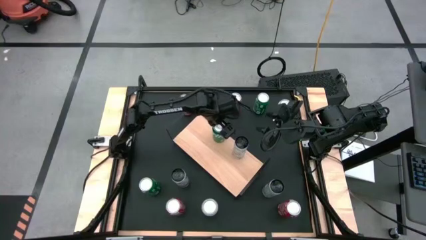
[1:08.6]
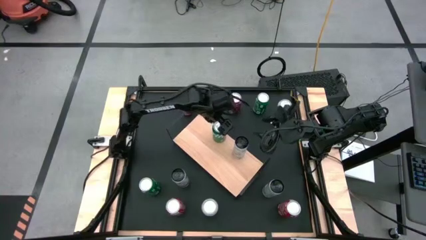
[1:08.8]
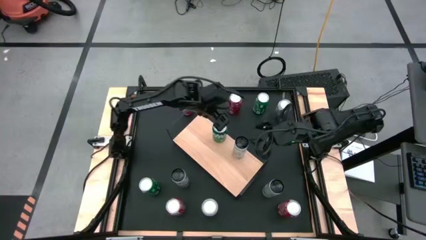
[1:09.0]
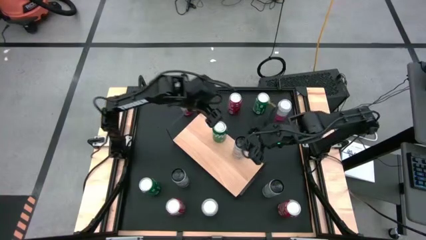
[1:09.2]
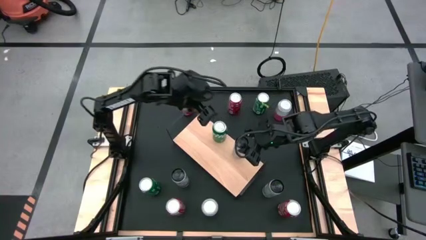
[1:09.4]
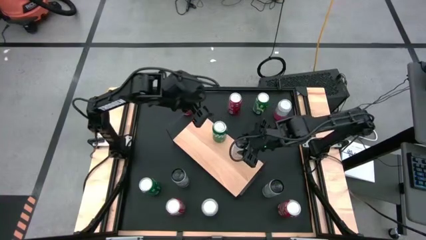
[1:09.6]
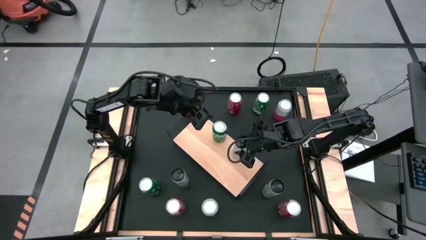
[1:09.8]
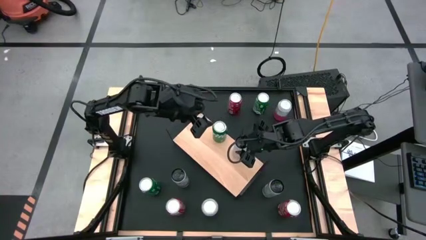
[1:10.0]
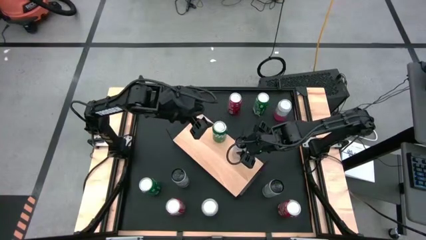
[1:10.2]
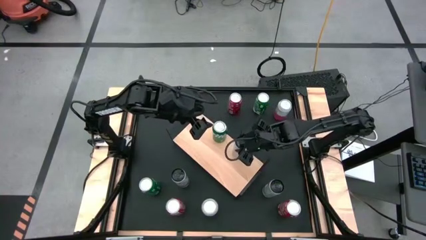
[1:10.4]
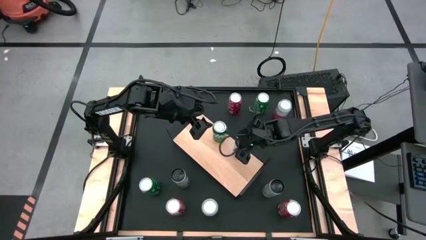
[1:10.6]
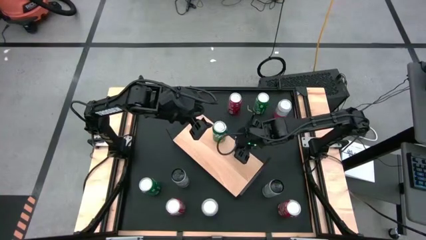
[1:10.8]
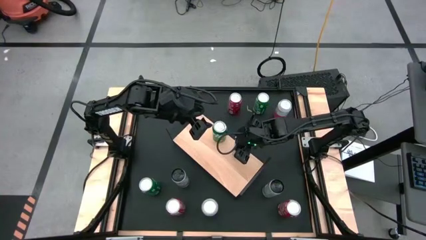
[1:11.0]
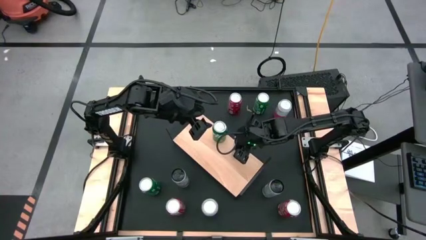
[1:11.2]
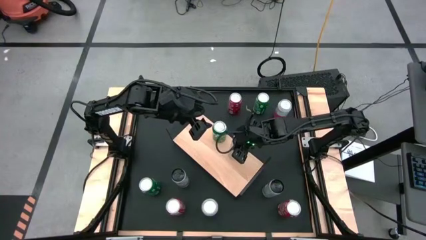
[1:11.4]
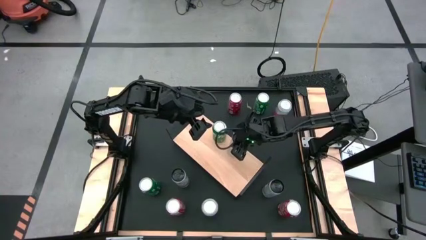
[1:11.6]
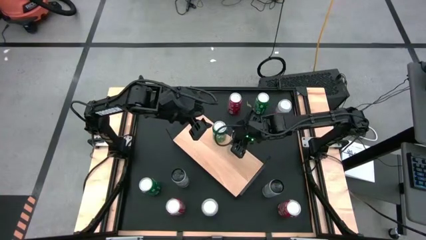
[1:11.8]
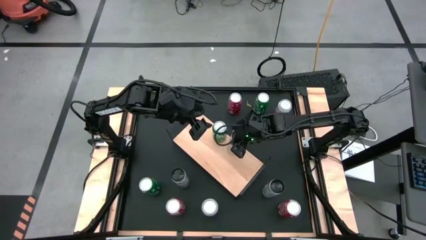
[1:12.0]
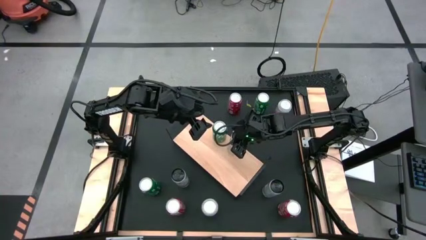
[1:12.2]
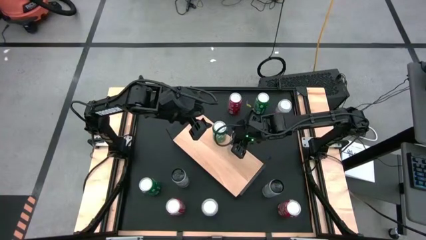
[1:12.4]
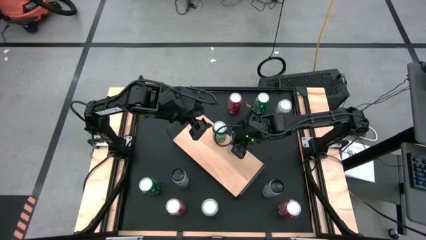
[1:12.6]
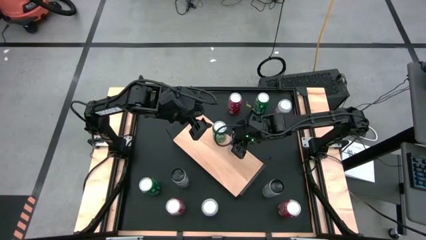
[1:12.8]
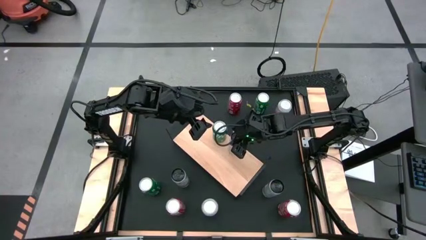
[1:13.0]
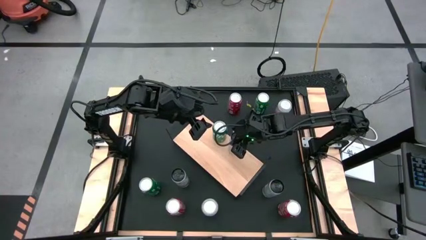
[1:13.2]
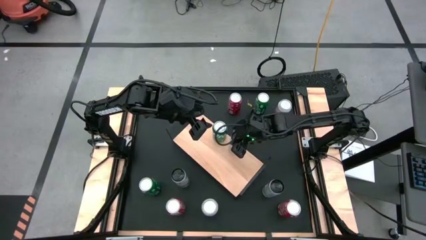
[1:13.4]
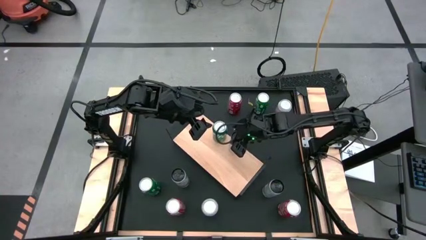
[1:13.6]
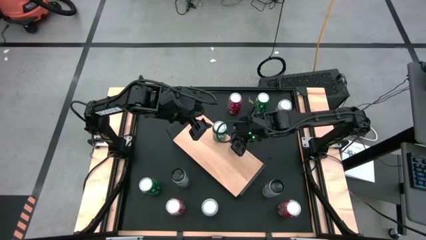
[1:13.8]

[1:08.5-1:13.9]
Task: Place canned beverage on shelf
Adjust the white can on the shelf

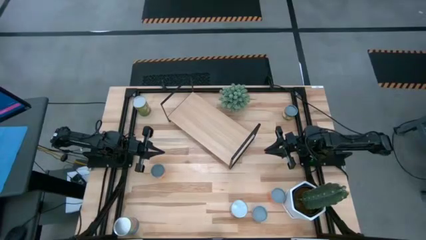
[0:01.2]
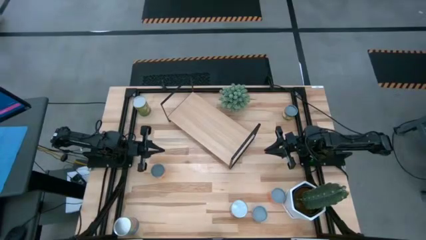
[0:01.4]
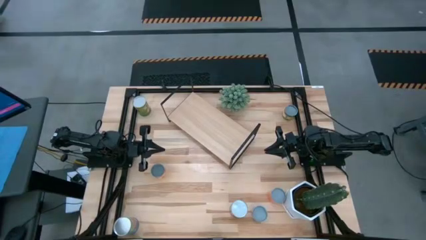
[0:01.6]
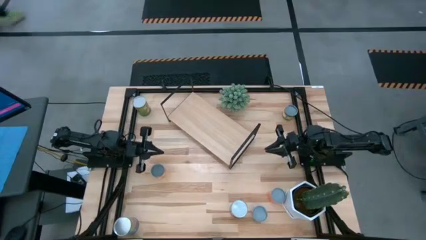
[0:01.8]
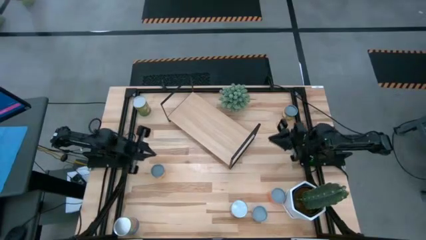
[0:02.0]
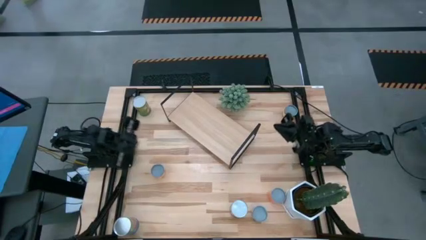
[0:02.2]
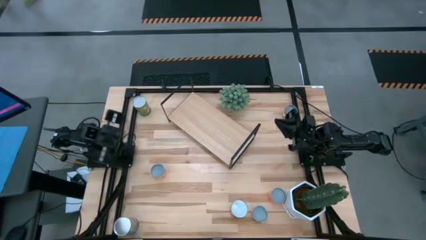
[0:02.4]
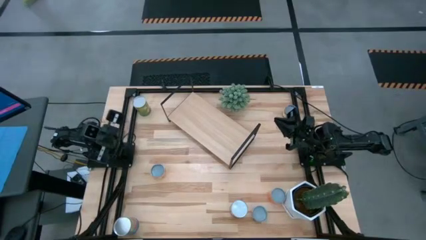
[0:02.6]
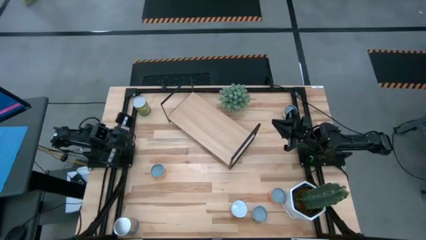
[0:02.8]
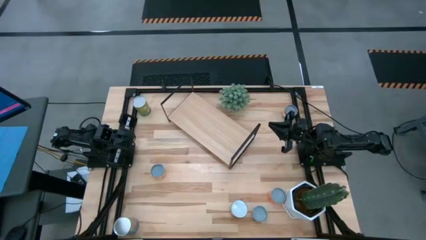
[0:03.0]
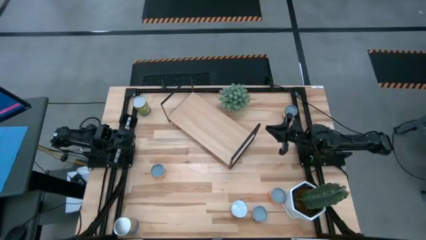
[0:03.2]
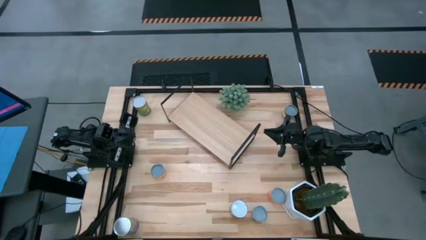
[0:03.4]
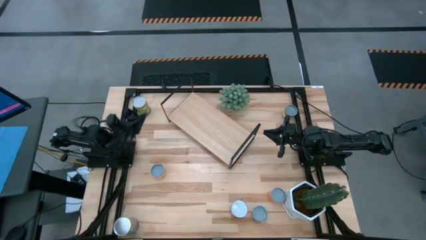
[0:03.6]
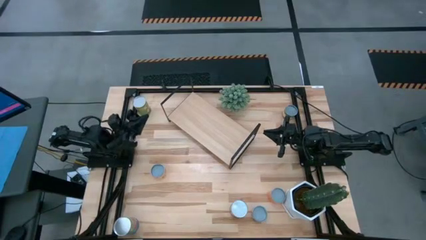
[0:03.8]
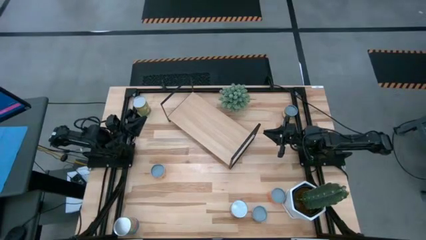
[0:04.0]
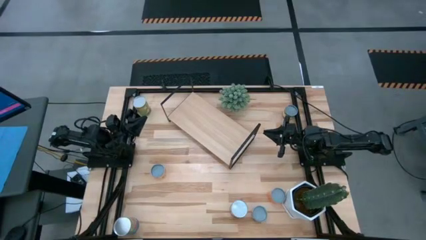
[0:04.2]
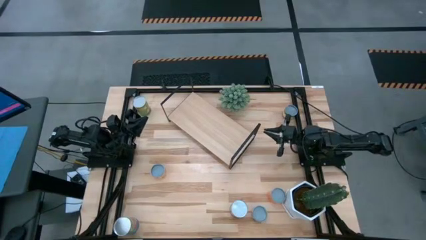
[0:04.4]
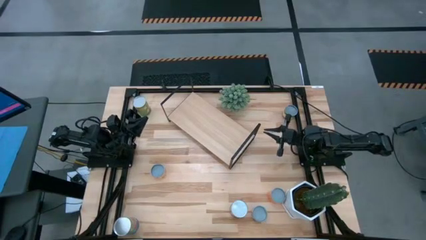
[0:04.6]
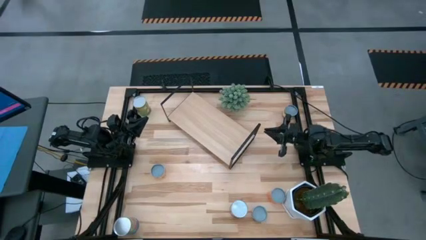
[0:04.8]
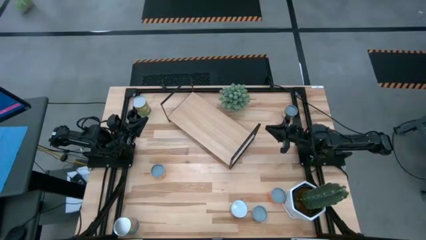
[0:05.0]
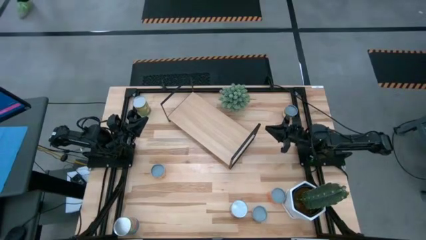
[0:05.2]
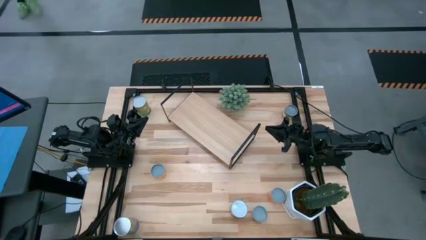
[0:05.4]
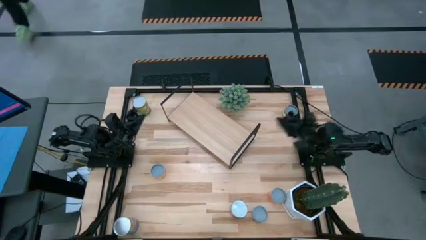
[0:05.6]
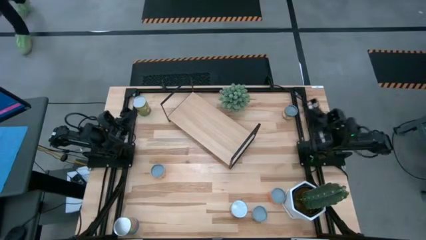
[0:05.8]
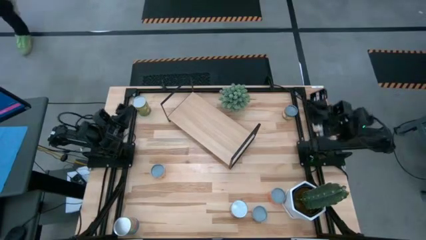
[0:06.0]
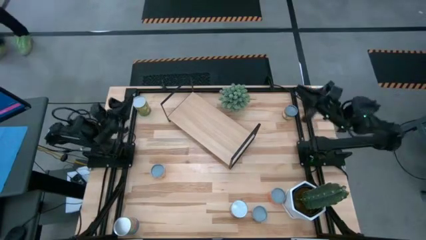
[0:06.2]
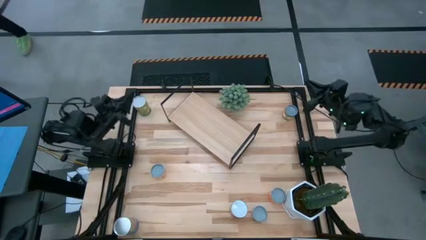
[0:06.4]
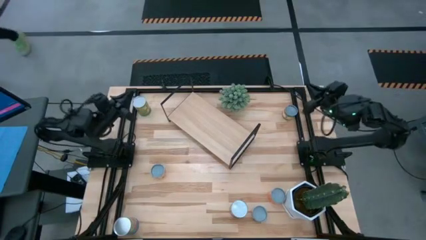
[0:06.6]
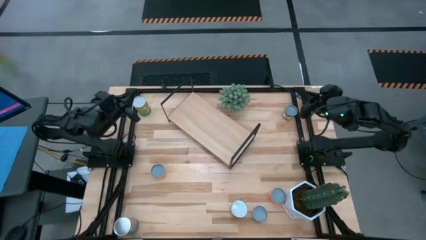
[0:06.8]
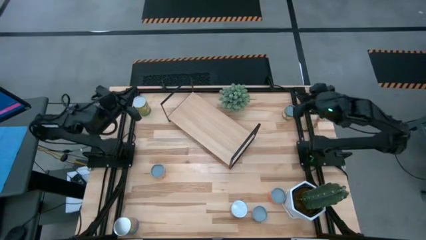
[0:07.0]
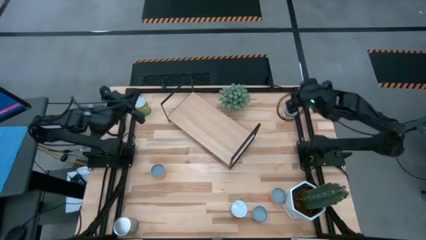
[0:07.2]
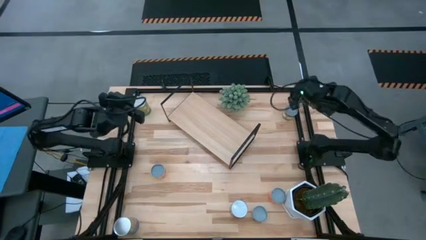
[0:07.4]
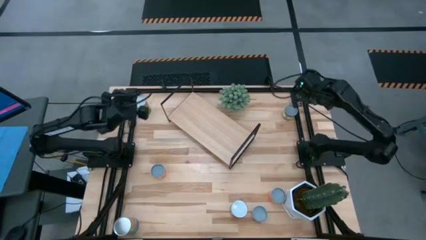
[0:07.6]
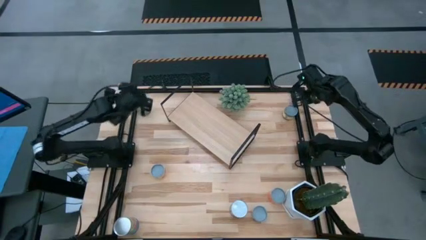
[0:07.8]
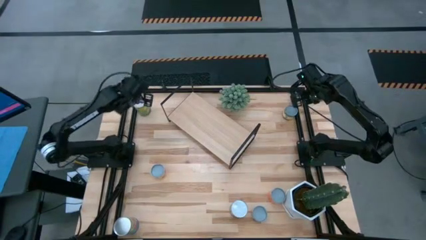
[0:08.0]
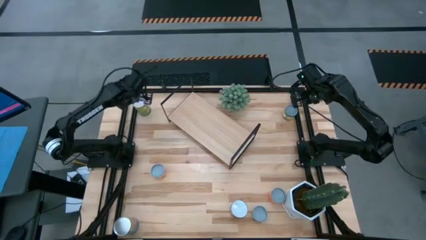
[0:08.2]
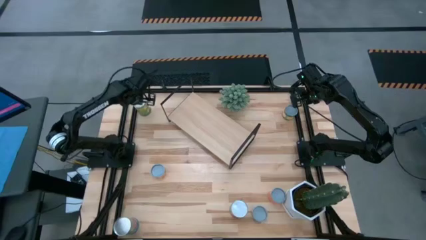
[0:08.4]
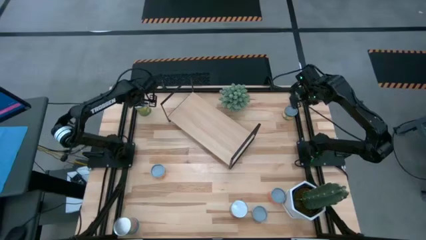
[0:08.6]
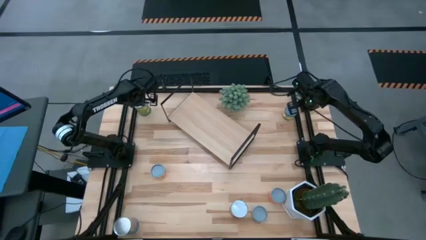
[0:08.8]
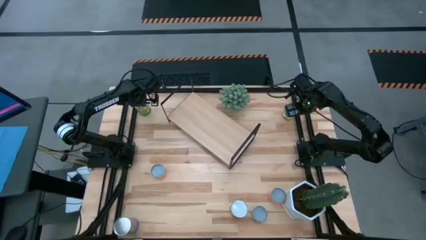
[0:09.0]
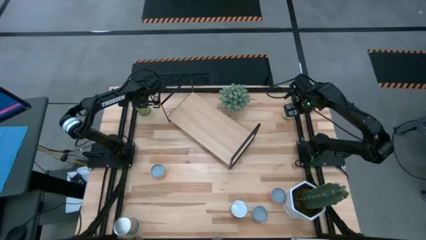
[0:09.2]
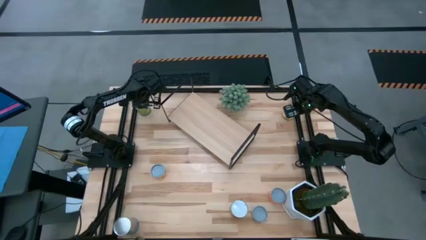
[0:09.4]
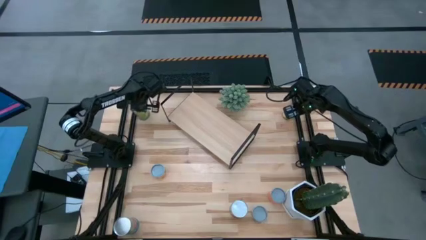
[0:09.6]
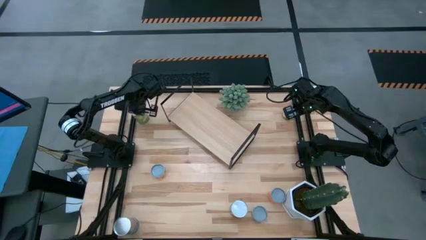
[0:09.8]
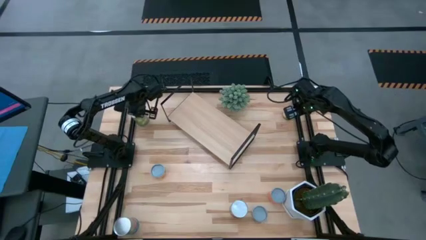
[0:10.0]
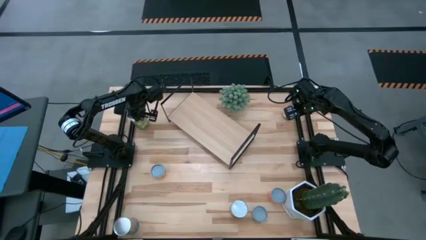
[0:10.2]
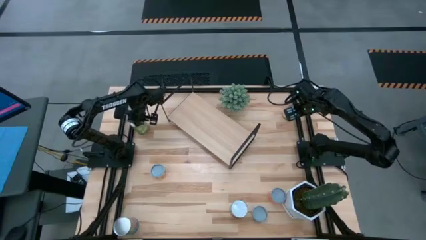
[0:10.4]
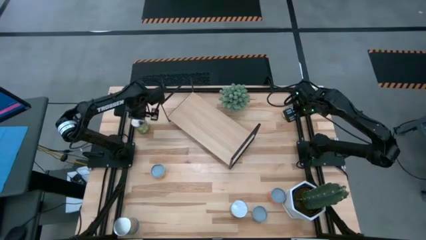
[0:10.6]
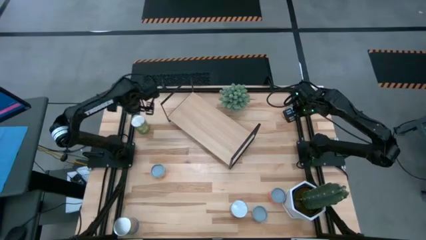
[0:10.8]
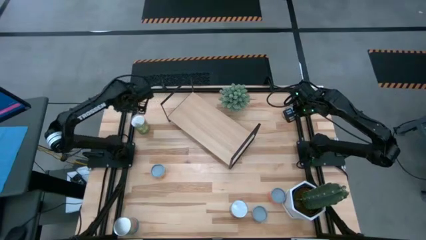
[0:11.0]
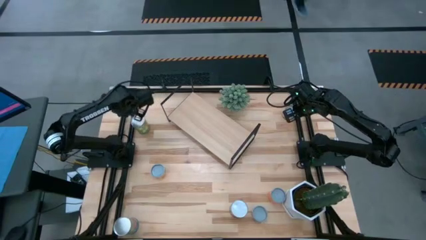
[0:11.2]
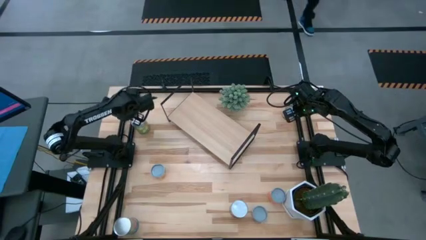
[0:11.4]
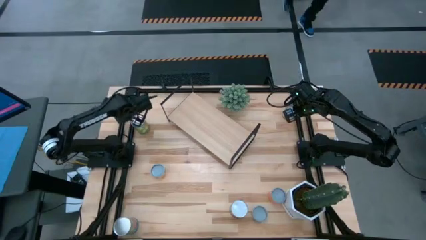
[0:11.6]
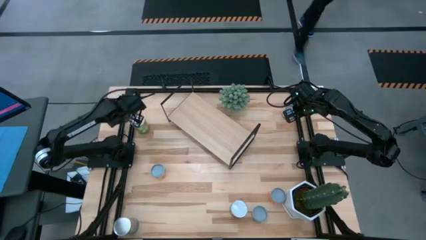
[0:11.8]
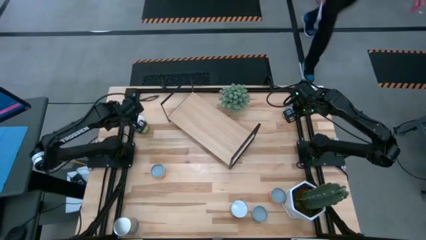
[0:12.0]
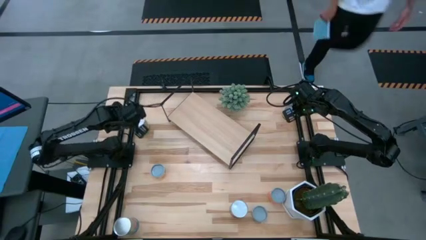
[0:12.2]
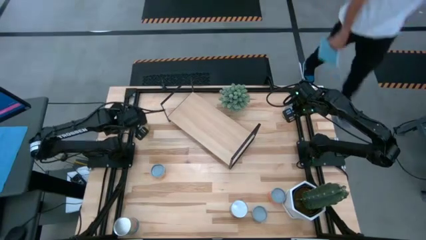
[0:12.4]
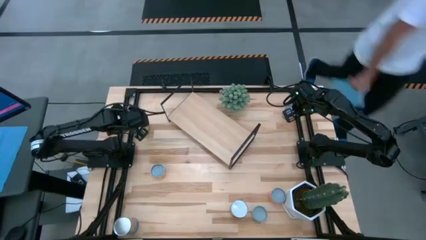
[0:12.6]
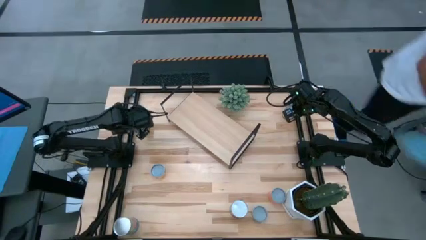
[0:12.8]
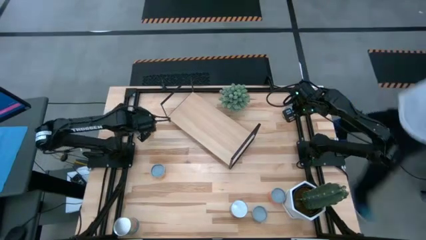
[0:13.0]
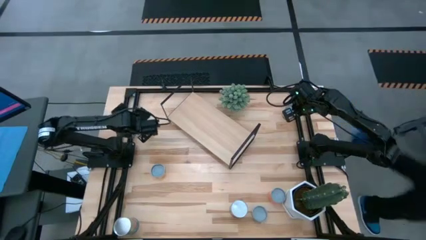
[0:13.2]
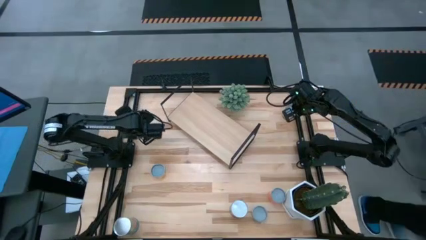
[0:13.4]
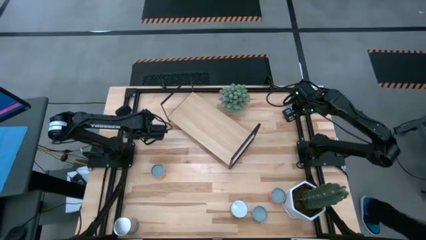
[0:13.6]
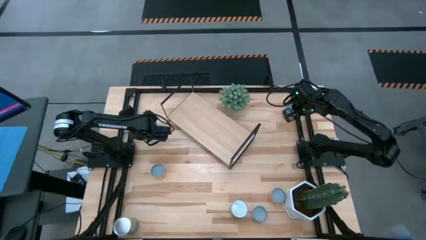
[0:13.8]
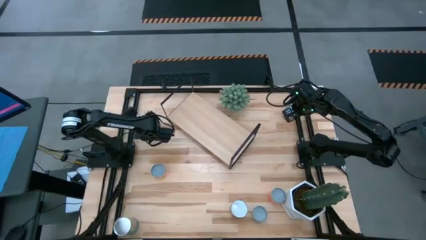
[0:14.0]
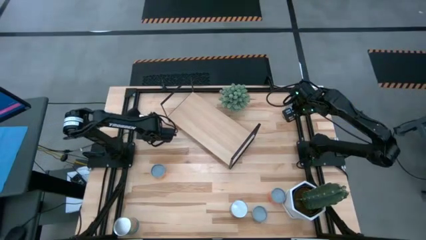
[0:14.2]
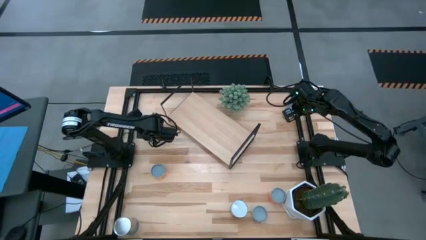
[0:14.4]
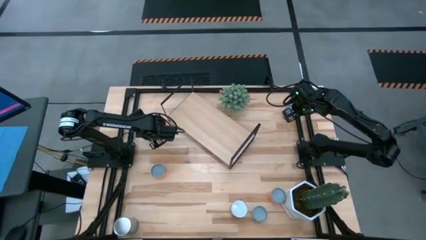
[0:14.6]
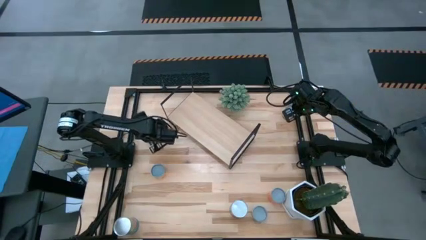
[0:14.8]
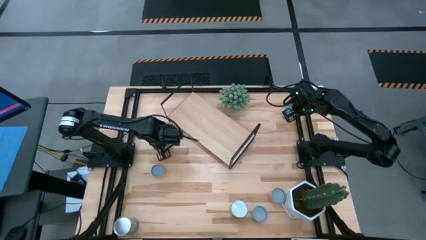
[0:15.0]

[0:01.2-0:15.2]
Task: Pick and place cans onto a shelf
Move the canned pears to the center of the table
